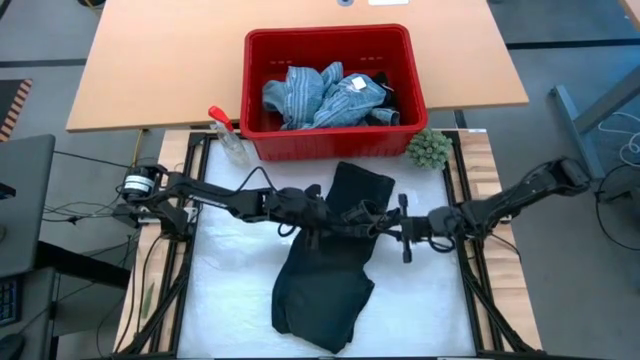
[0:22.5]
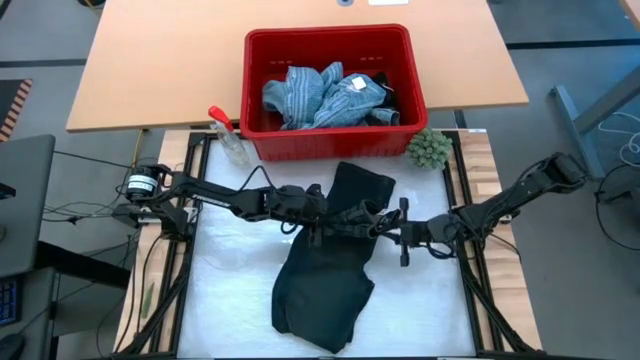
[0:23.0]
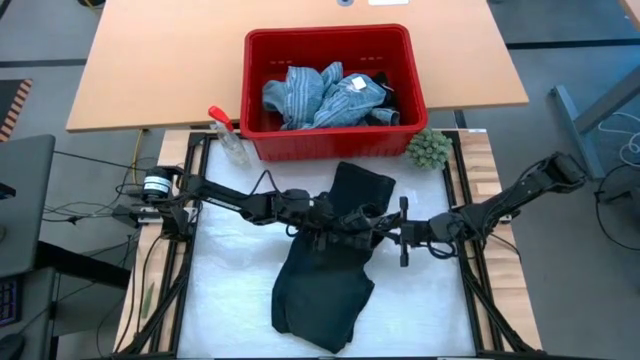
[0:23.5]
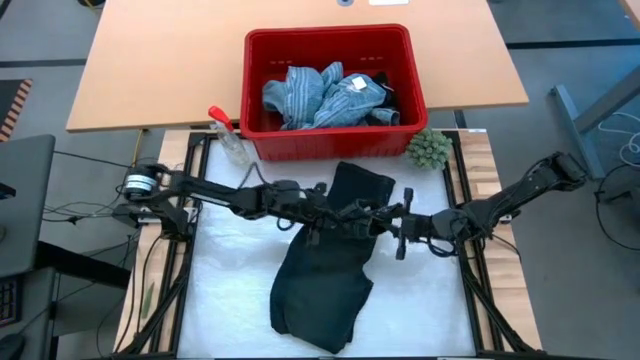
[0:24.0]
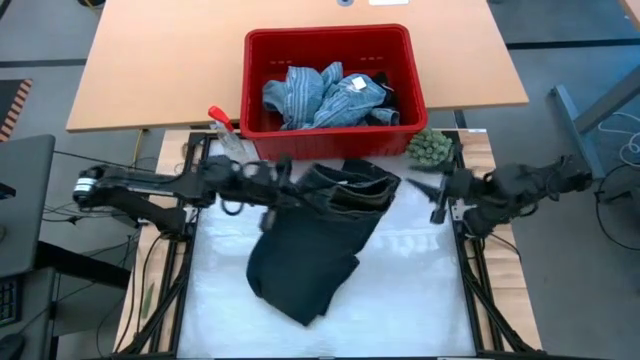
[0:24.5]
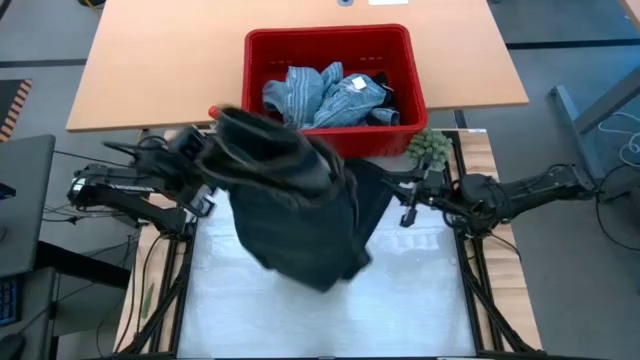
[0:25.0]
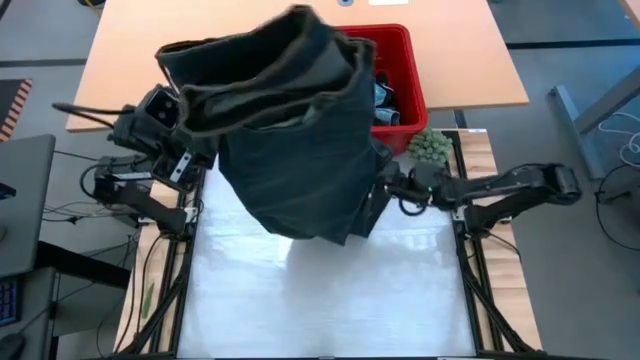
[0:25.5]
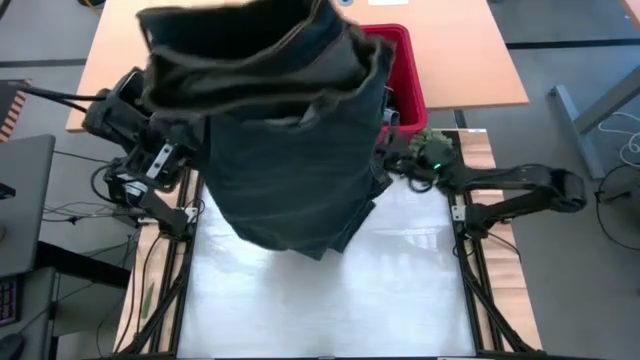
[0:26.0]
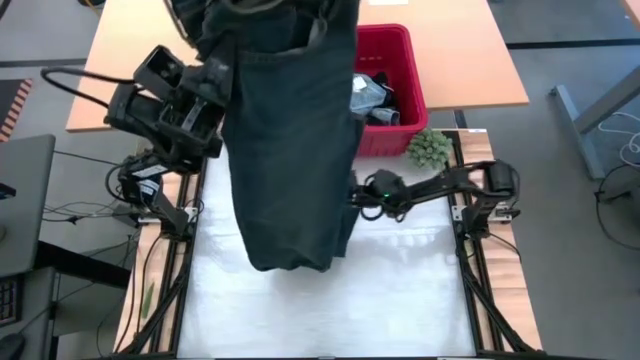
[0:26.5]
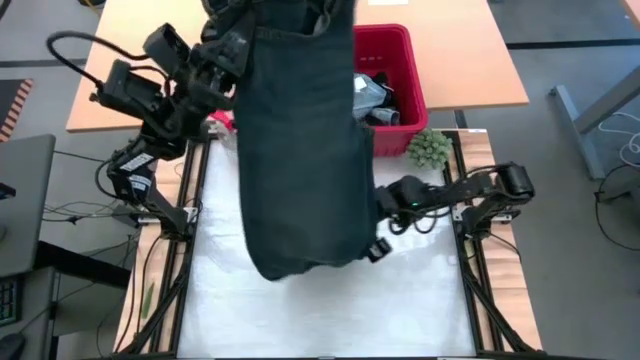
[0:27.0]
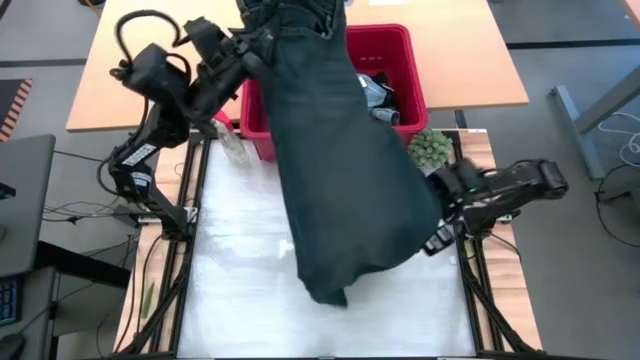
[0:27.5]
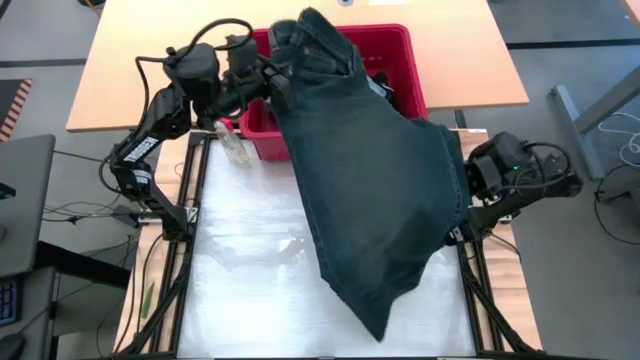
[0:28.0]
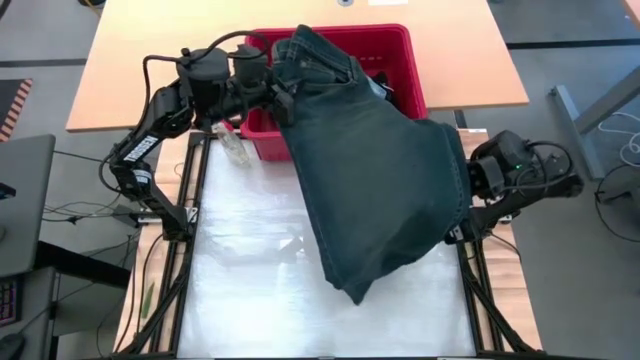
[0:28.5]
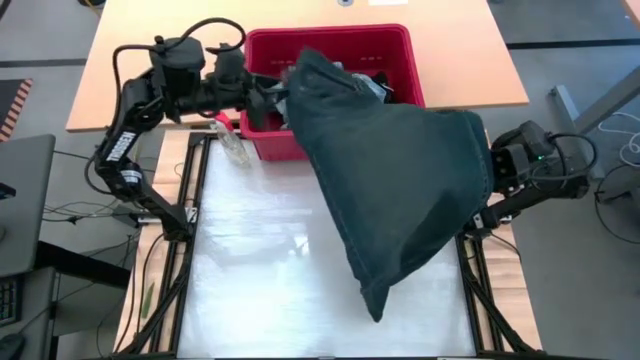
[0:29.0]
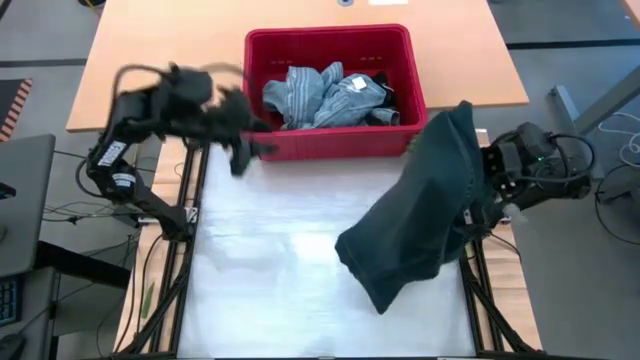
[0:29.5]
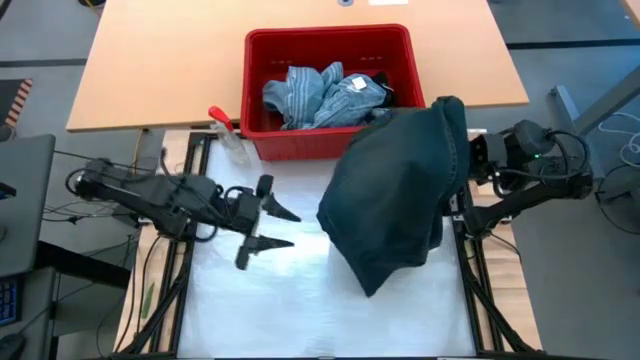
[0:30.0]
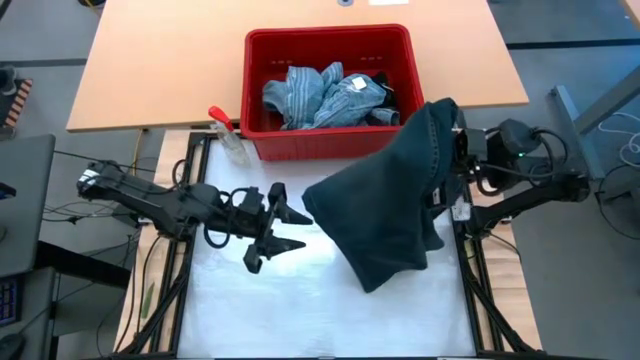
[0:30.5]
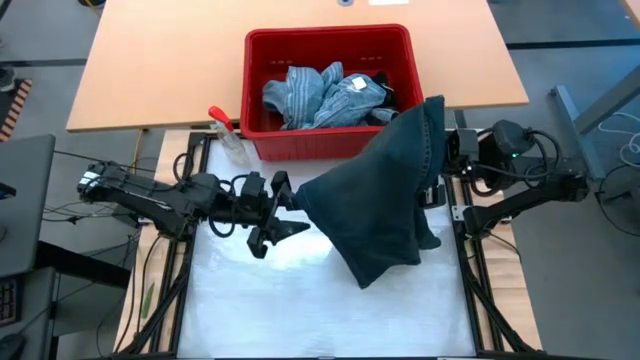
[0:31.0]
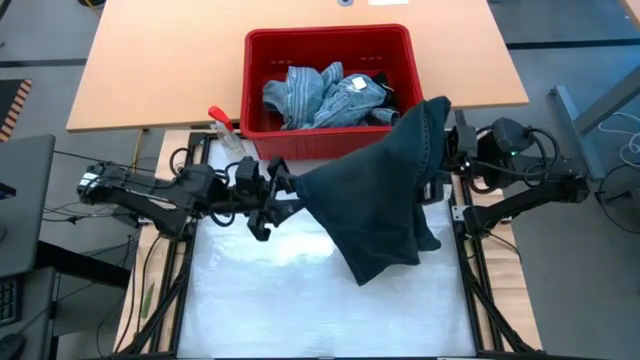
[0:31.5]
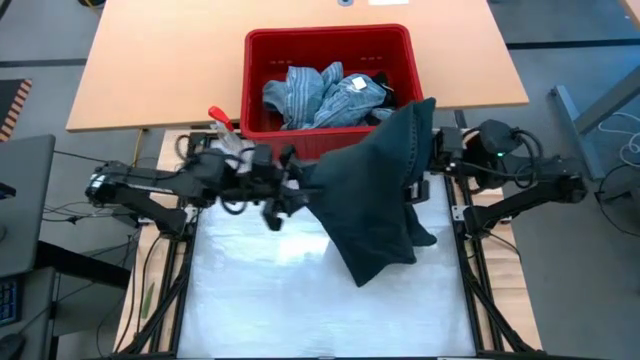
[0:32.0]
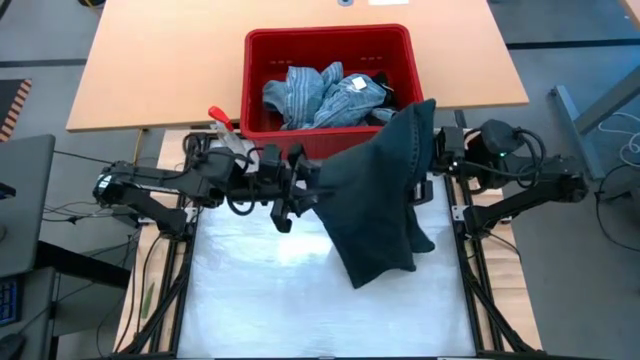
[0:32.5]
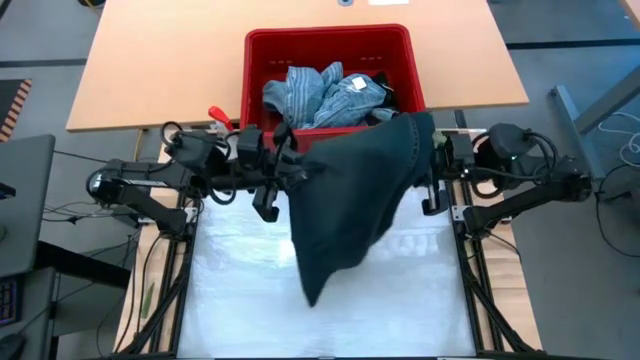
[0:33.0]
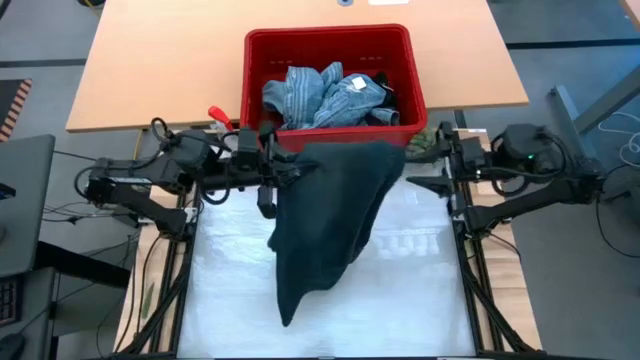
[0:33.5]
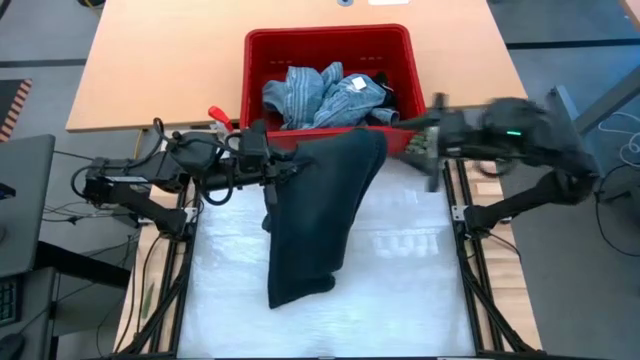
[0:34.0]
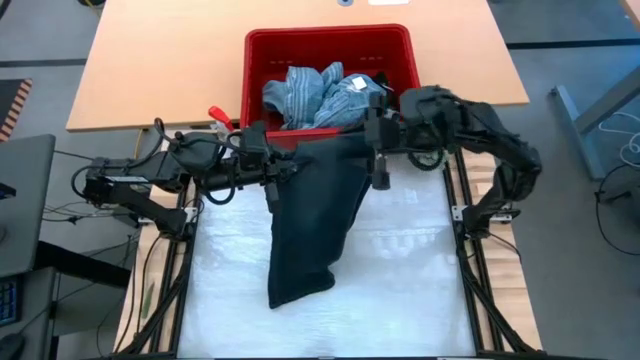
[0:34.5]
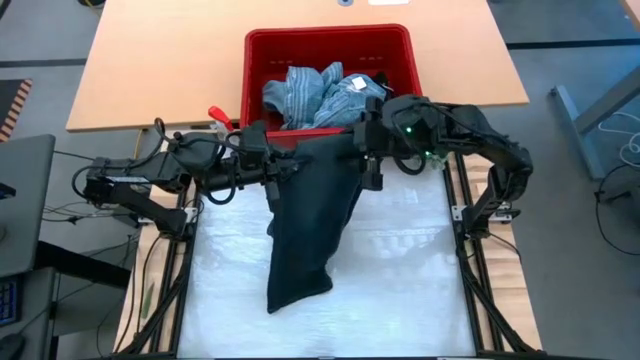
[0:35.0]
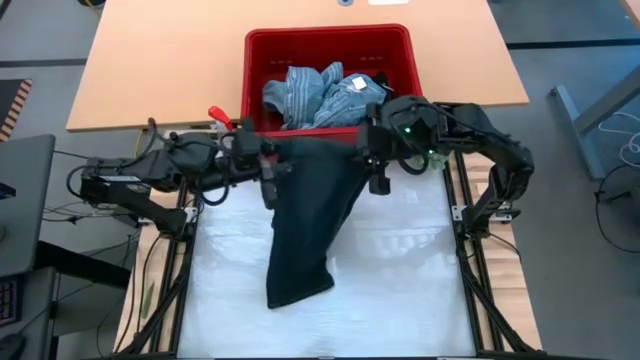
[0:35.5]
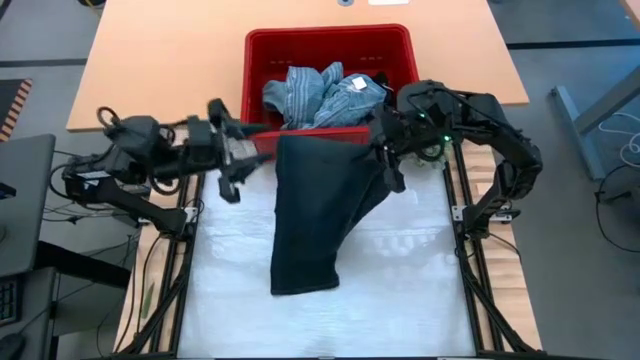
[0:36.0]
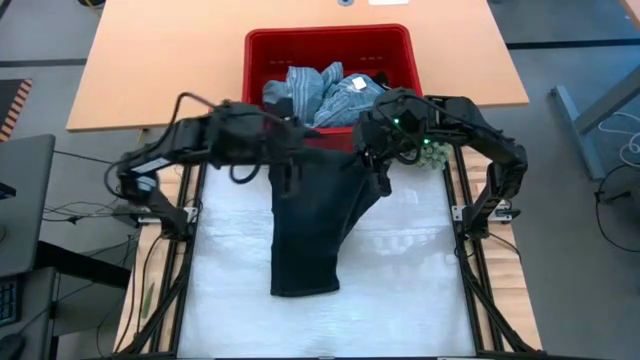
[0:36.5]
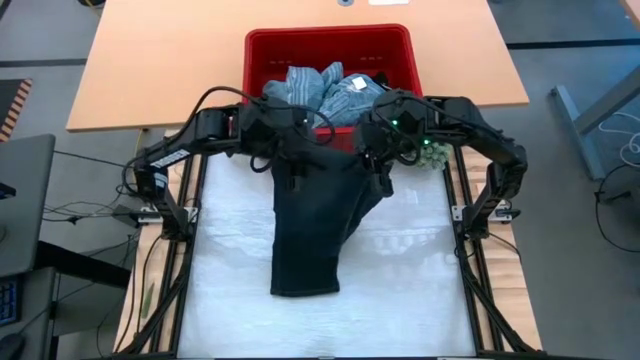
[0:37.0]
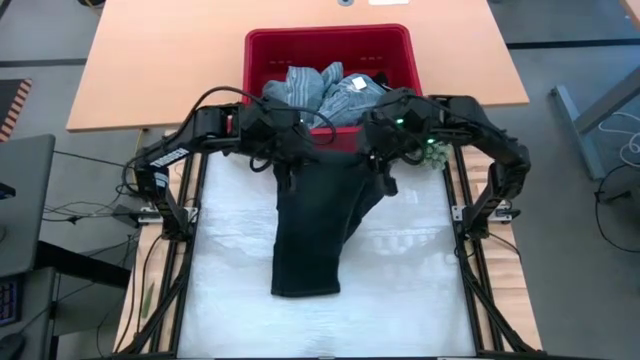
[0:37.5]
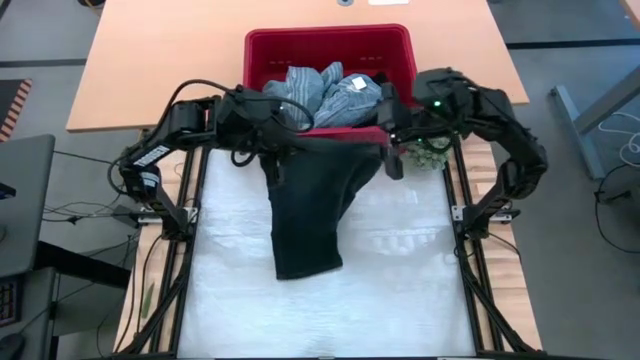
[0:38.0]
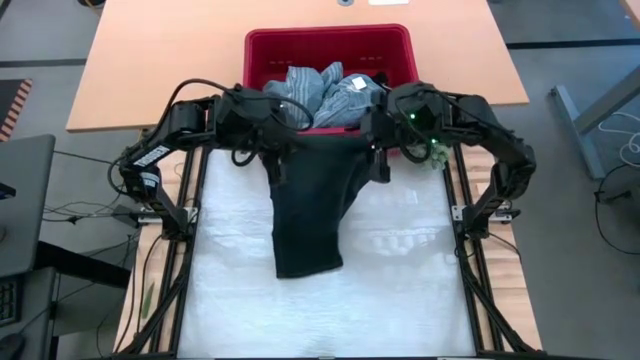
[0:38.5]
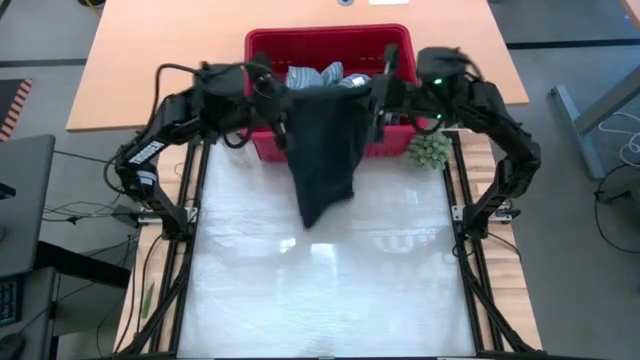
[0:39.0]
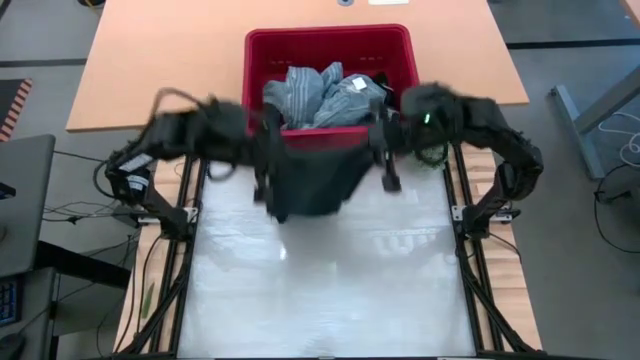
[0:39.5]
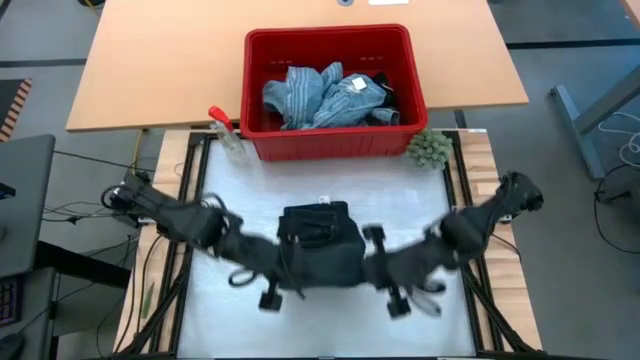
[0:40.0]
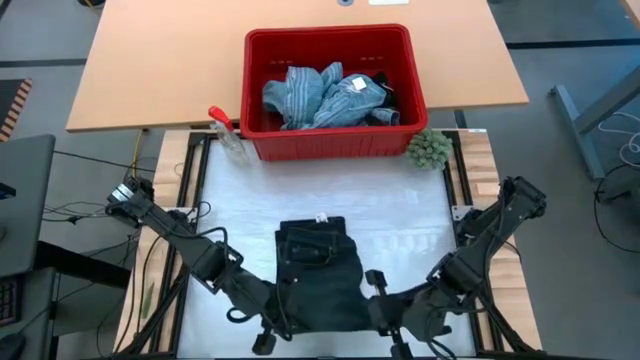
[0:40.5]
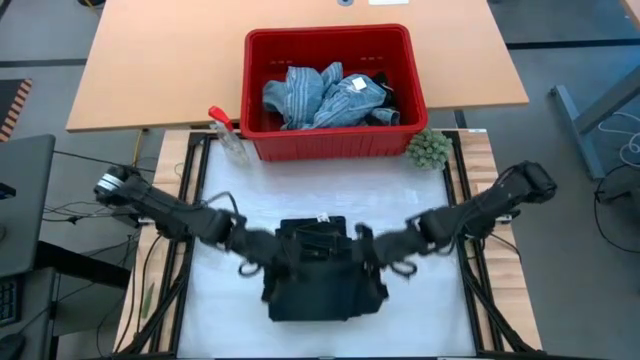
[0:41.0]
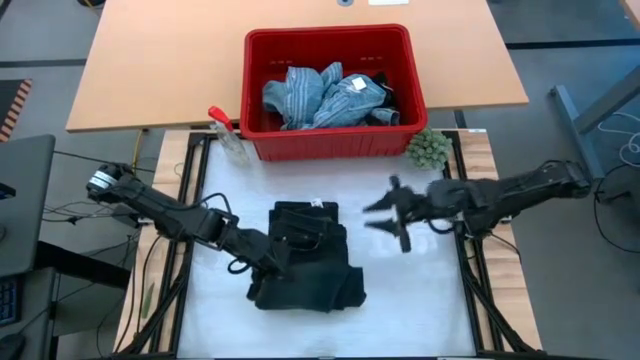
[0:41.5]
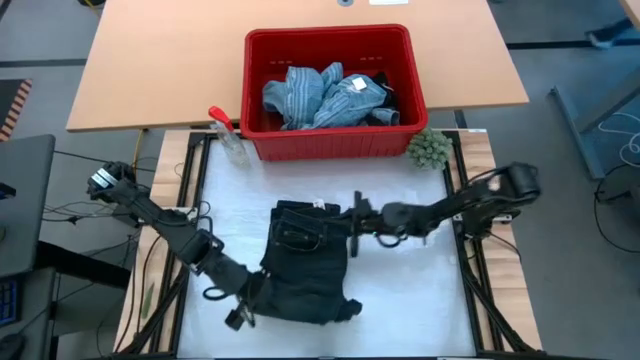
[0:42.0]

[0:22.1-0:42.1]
Task: Fold Laundry from Bin
Fold the dark blue pants
